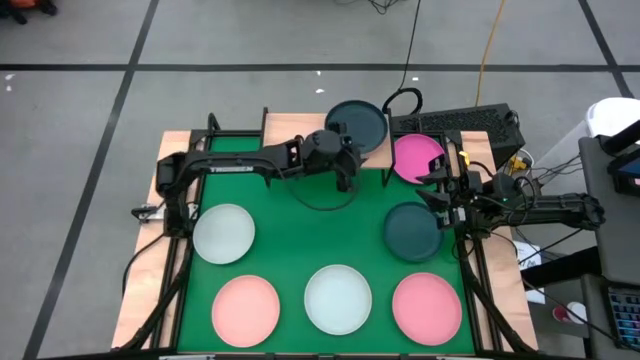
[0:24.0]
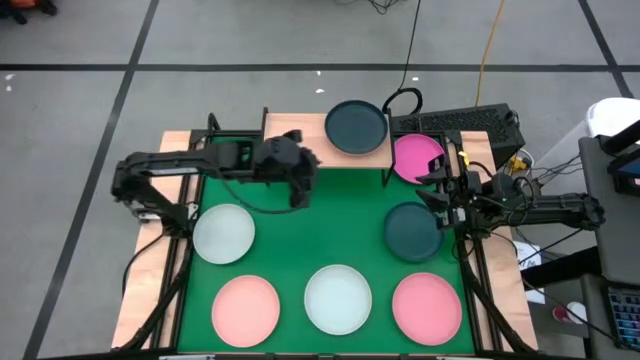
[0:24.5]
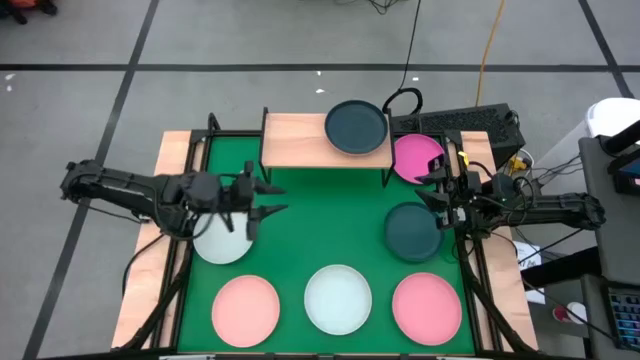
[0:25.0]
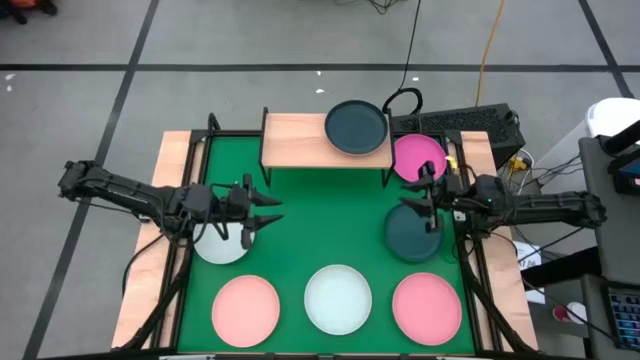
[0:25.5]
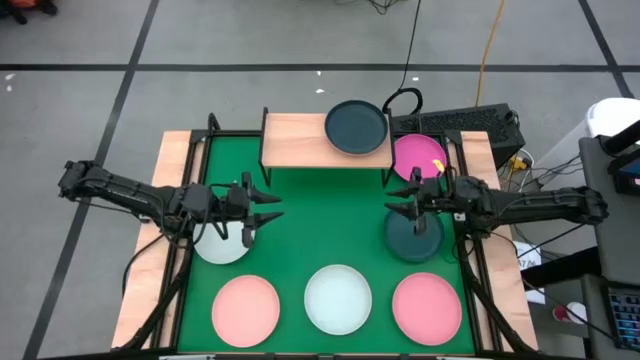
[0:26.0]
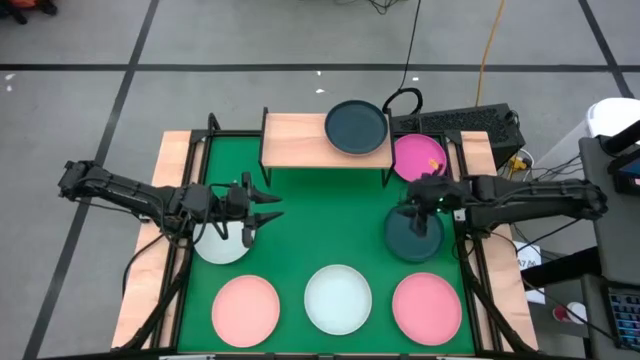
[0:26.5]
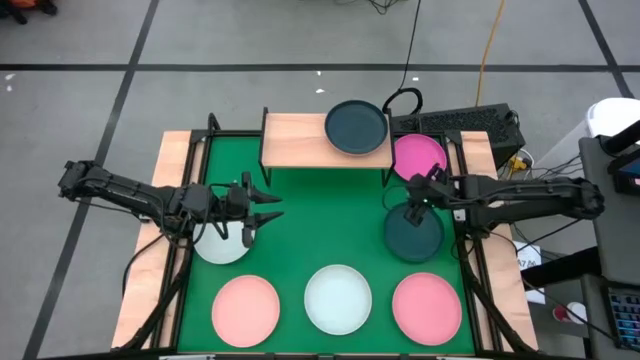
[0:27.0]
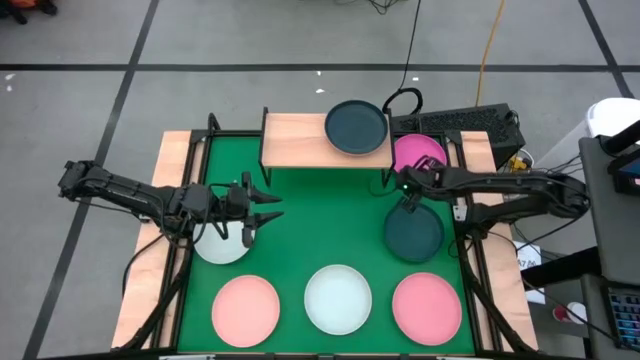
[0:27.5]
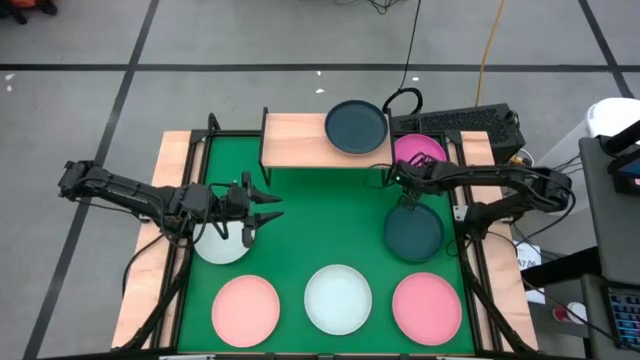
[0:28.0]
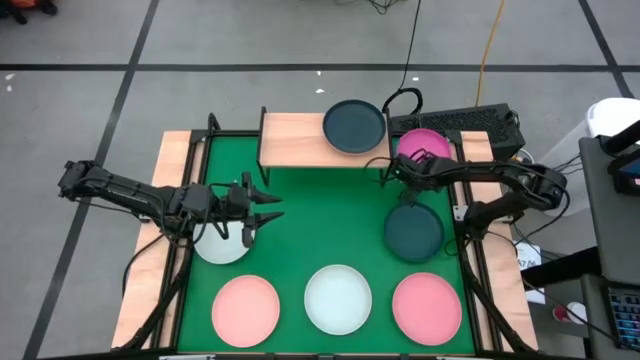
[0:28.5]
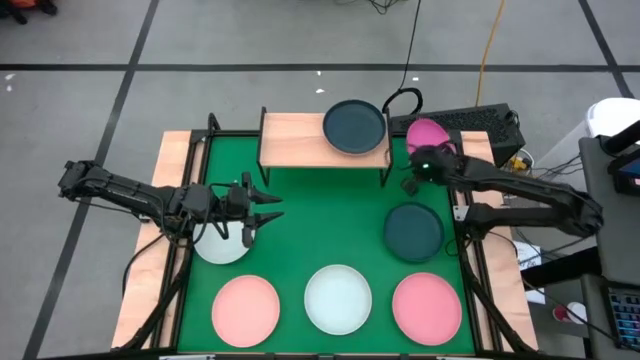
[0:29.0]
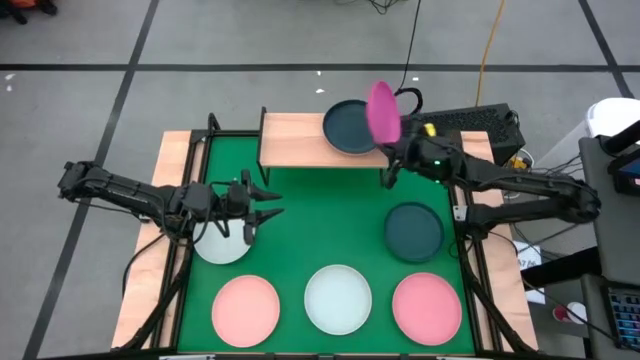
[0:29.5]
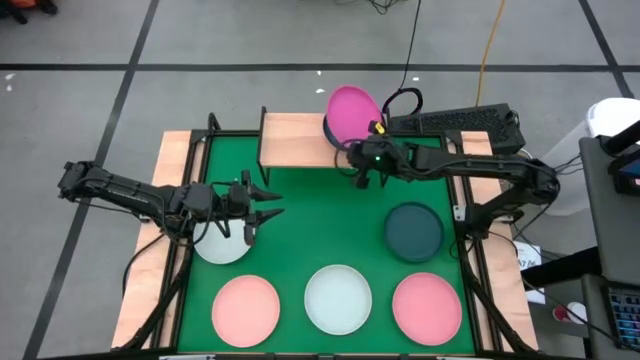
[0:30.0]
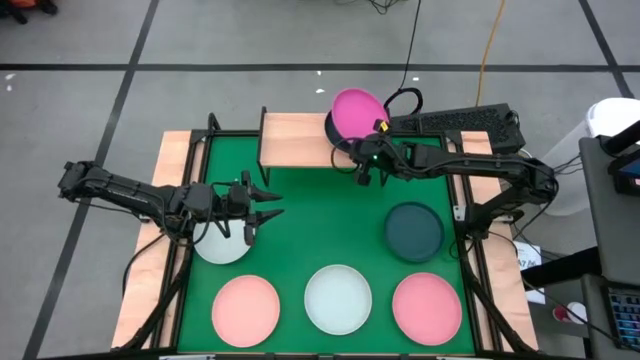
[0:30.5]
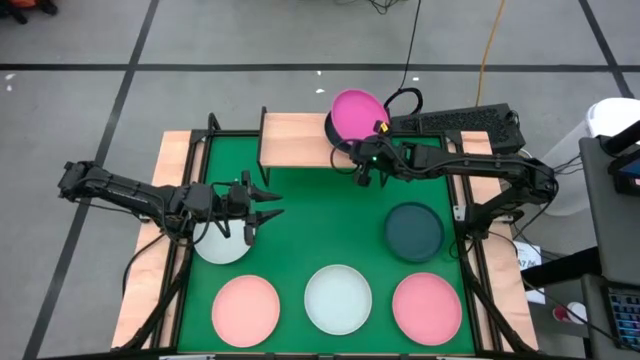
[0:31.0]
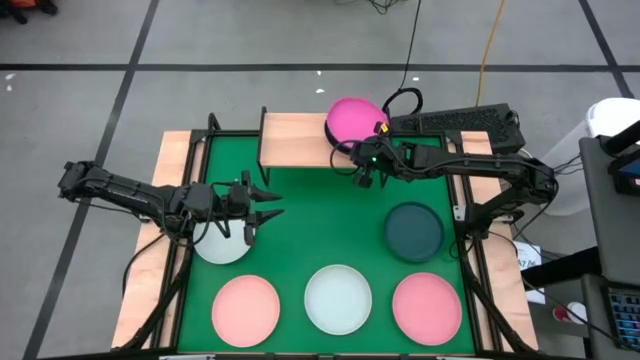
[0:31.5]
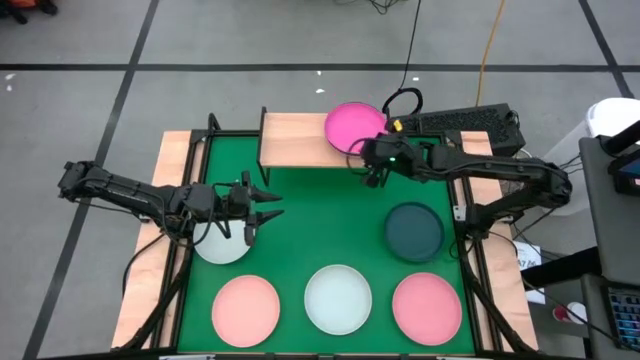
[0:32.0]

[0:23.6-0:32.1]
Task: Place and stack plates onto a shelf
Stack the pink plate on top of the black plate

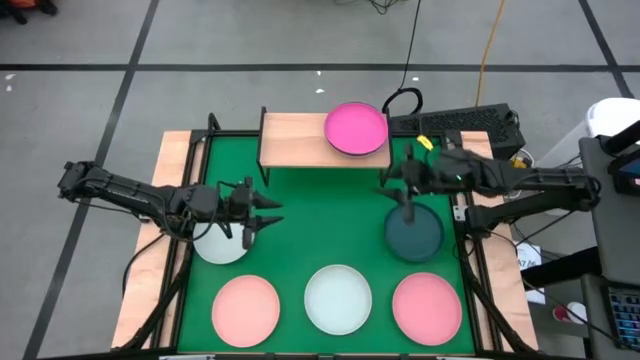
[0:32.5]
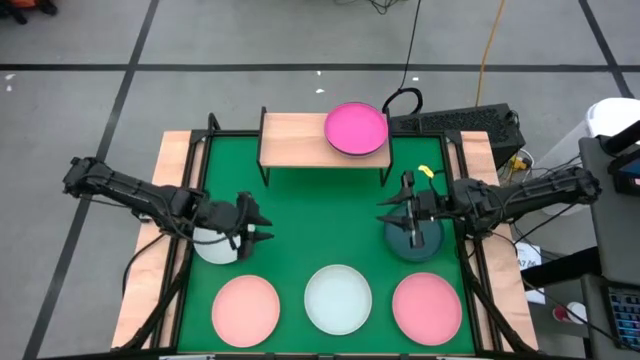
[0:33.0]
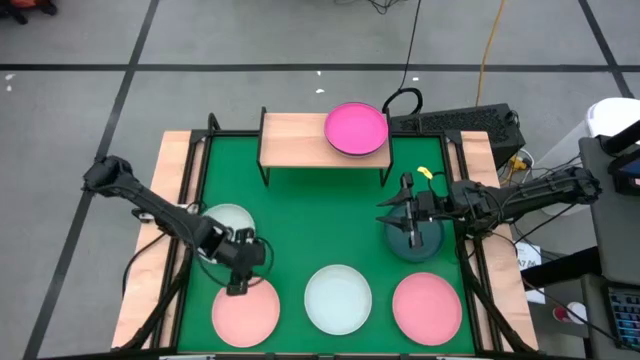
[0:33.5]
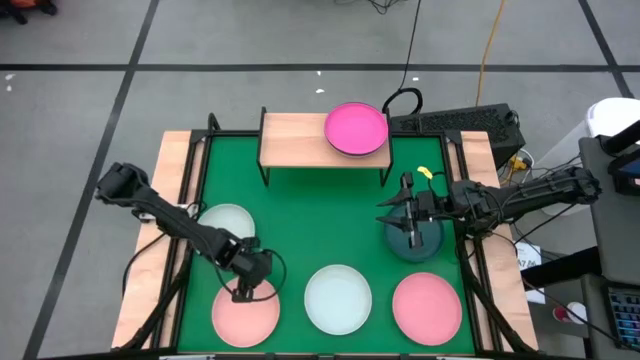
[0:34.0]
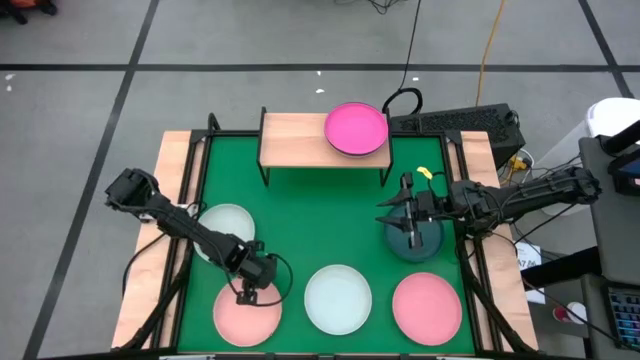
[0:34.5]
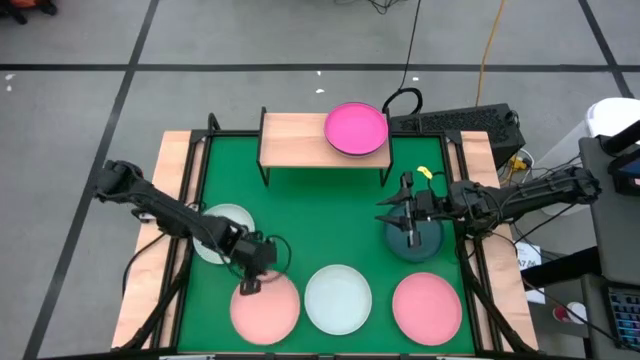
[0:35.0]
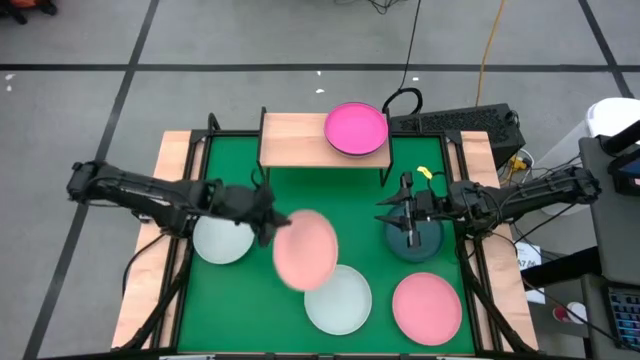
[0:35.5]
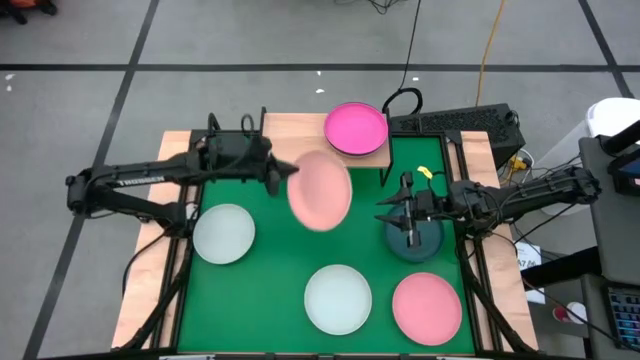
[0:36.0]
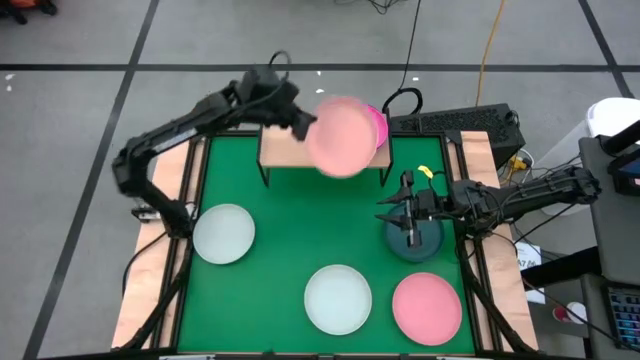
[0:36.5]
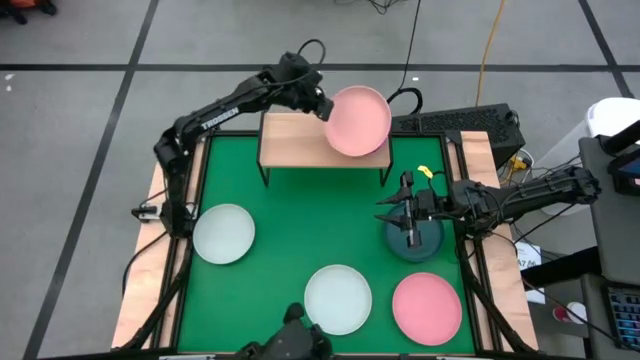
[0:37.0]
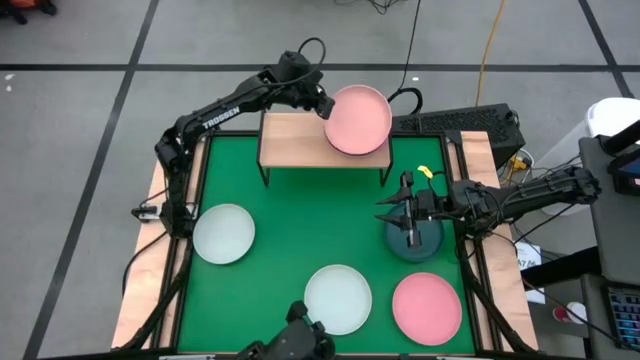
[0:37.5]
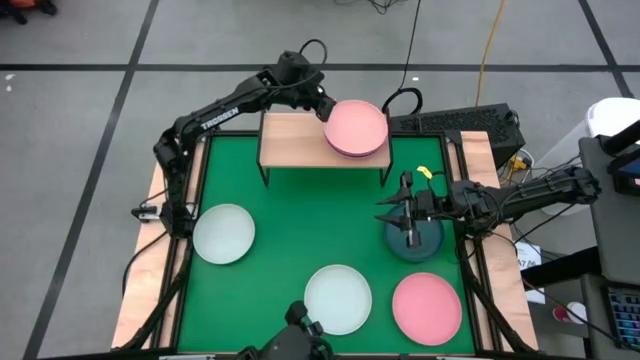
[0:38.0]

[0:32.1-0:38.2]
Stack the light orange plate on top of the pink plate

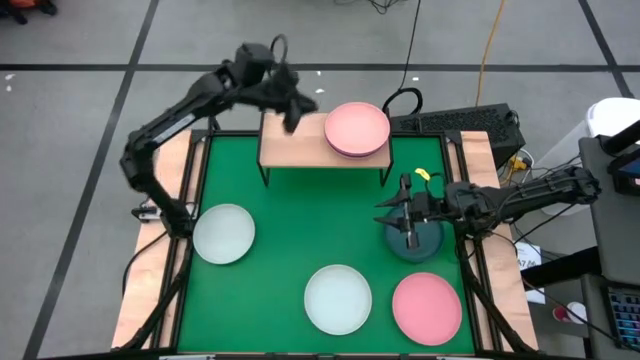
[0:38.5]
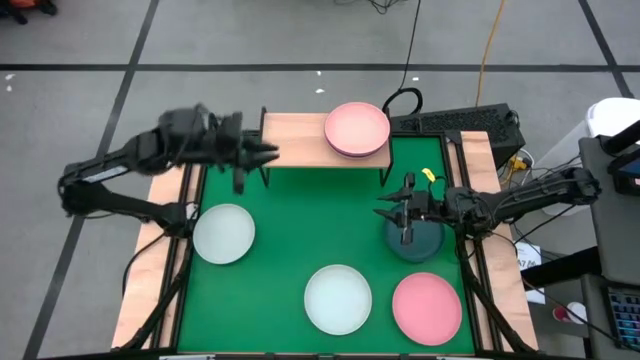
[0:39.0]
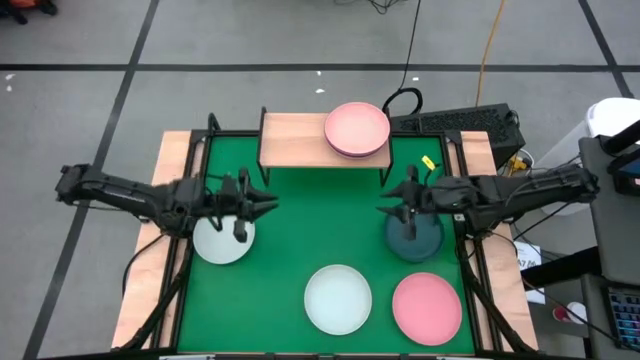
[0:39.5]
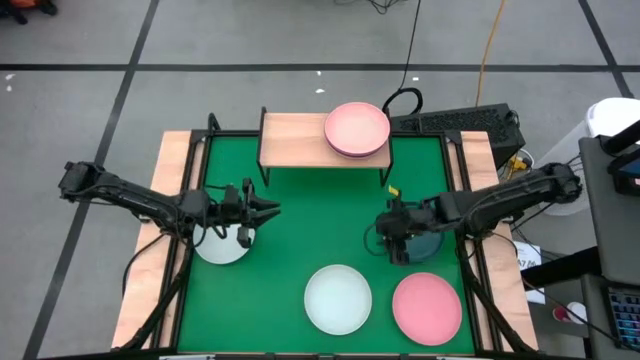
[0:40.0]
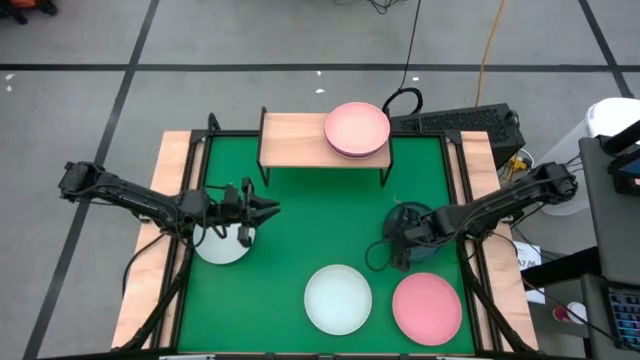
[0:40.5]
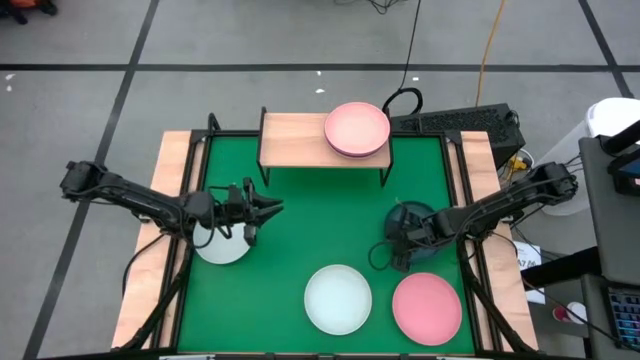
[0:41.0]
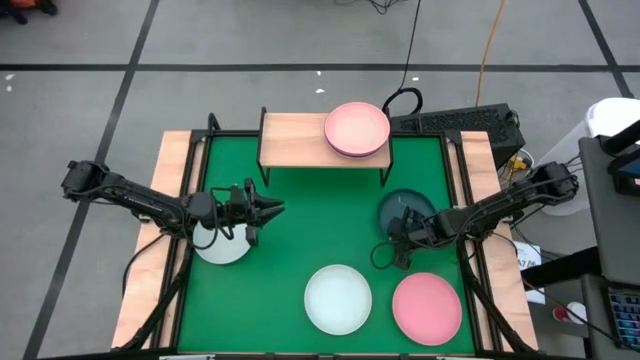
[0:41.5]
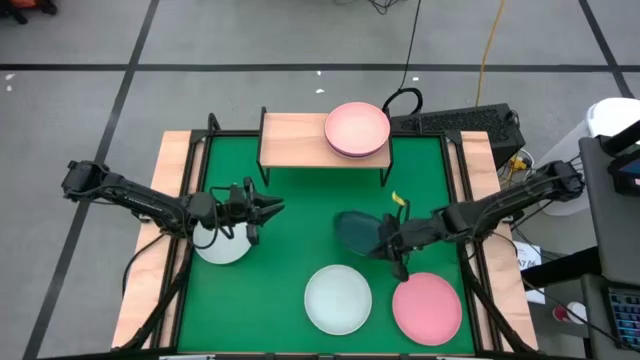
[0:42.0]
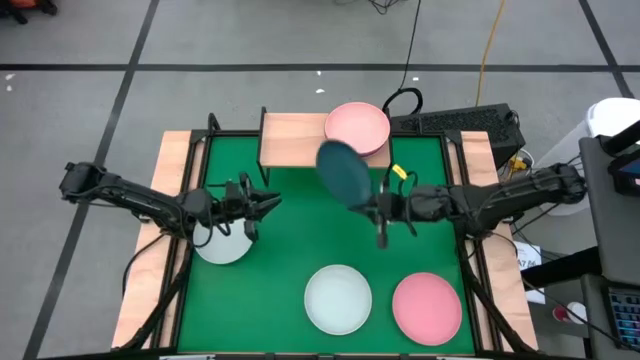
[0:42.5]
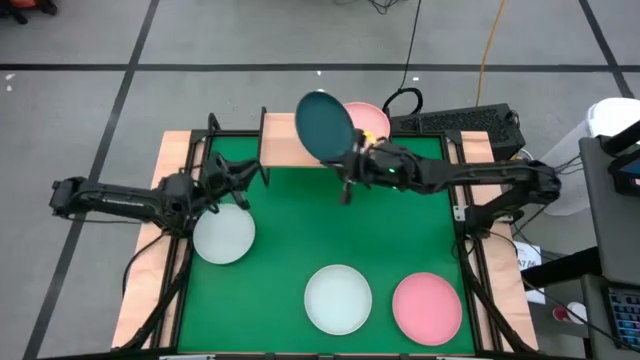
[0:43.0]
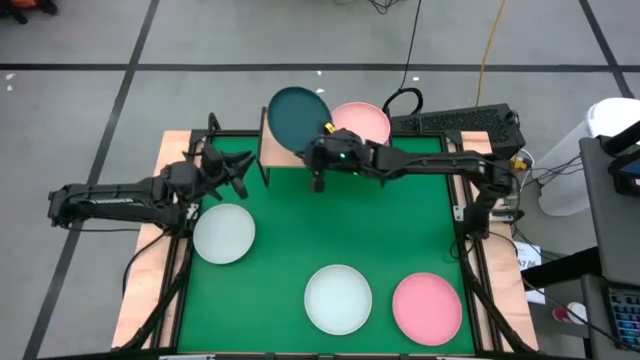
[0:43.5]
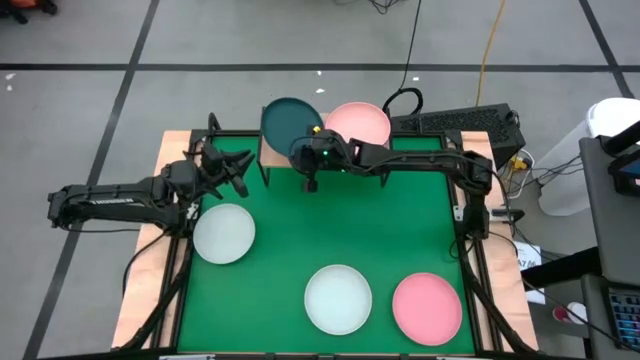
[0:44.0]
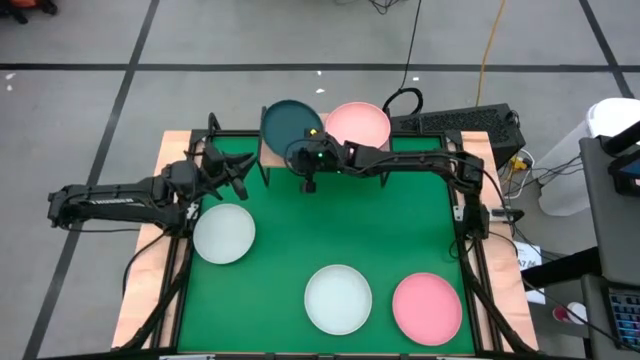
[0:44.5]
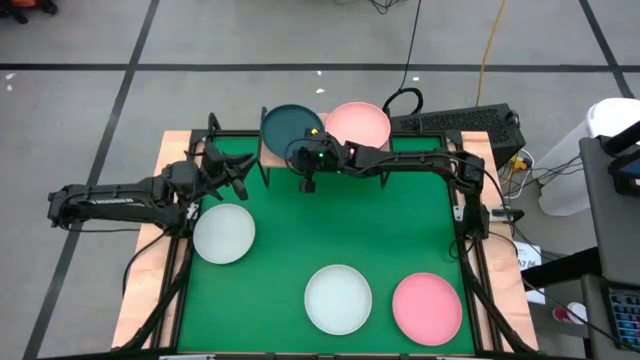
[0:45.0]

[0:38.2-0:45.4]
Put the dark green plate on the shelf
